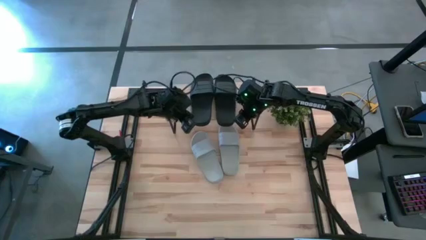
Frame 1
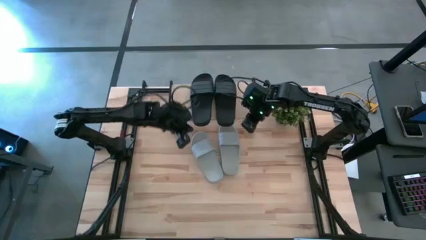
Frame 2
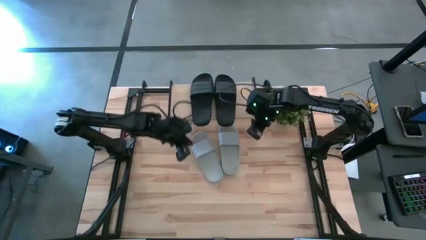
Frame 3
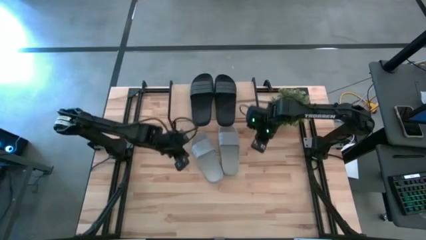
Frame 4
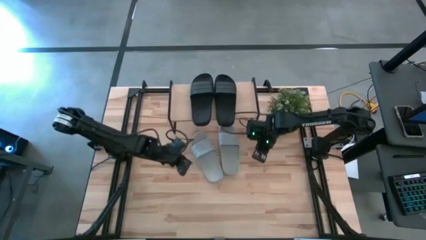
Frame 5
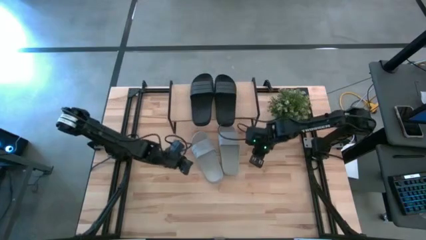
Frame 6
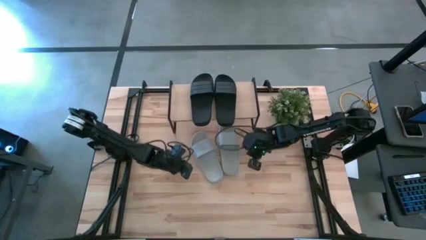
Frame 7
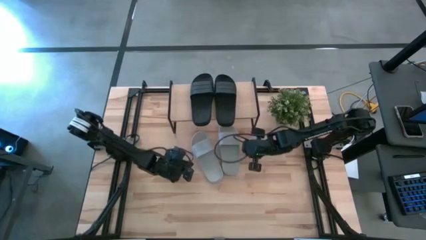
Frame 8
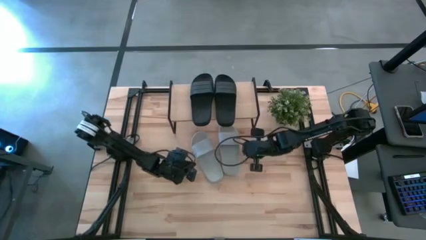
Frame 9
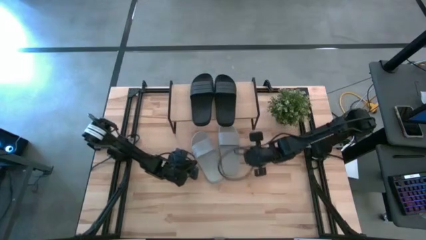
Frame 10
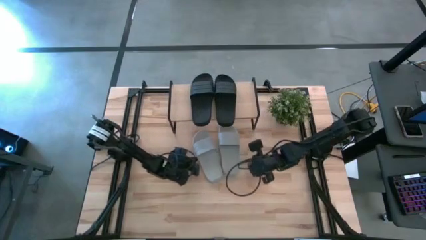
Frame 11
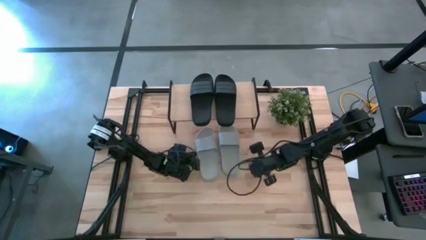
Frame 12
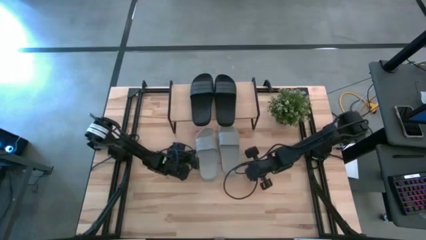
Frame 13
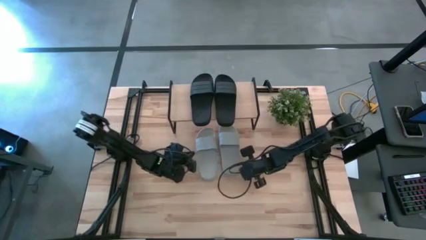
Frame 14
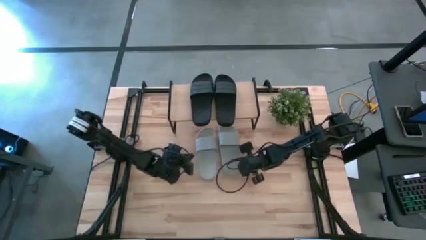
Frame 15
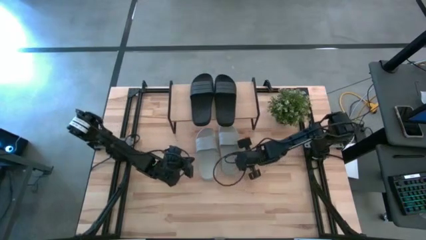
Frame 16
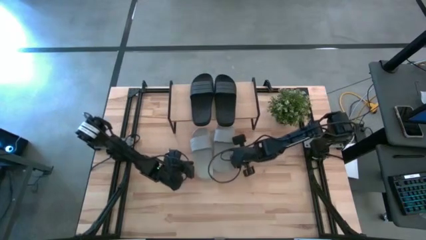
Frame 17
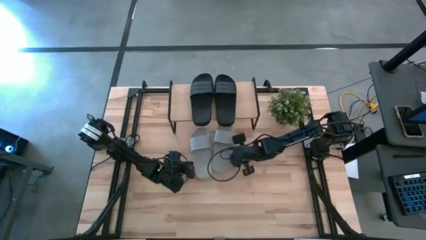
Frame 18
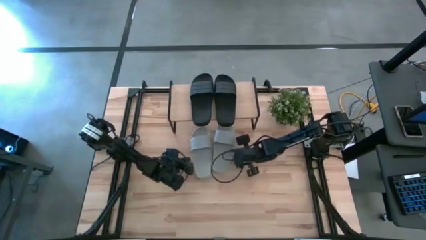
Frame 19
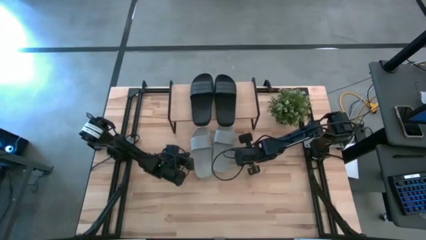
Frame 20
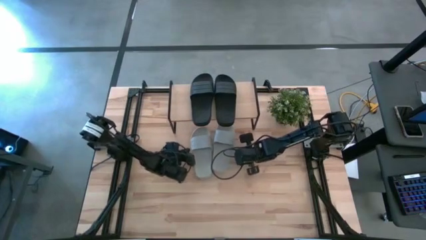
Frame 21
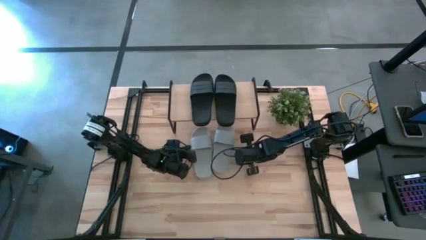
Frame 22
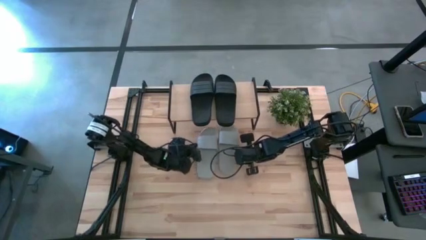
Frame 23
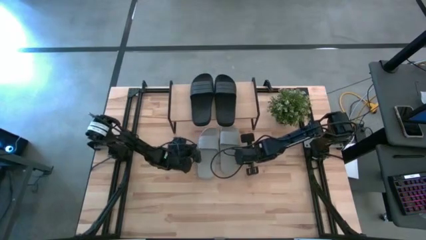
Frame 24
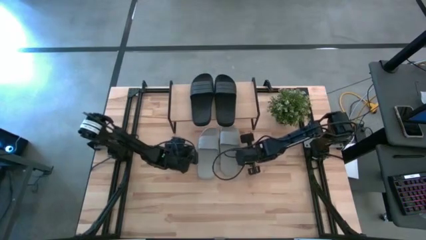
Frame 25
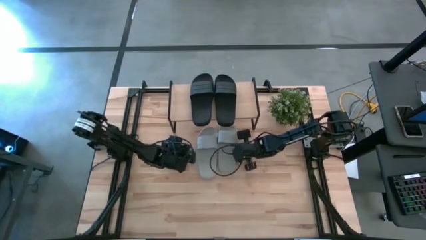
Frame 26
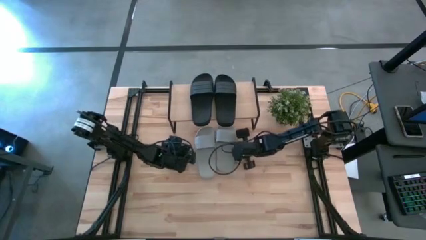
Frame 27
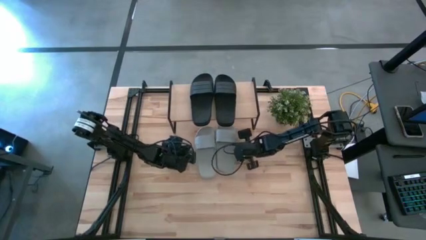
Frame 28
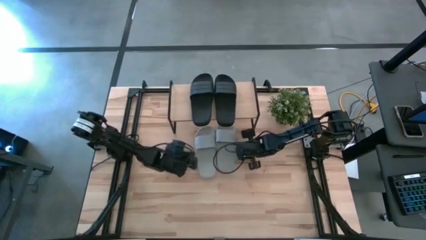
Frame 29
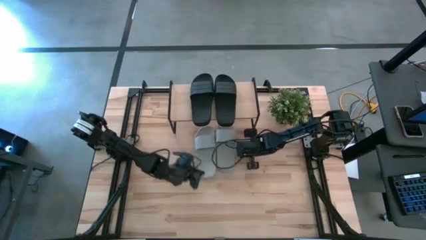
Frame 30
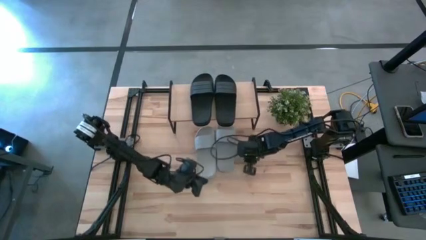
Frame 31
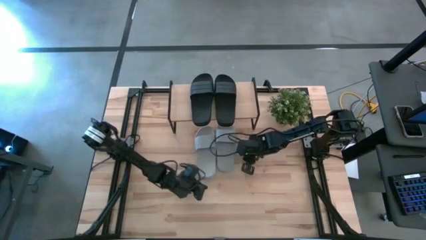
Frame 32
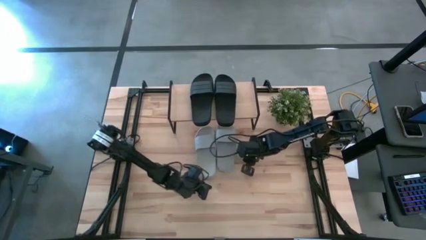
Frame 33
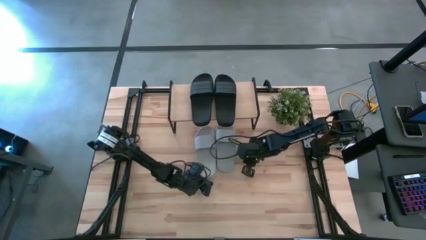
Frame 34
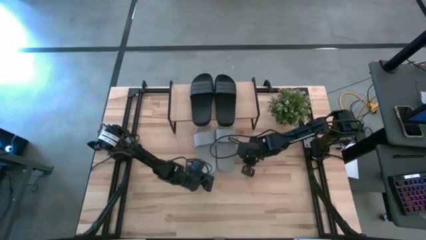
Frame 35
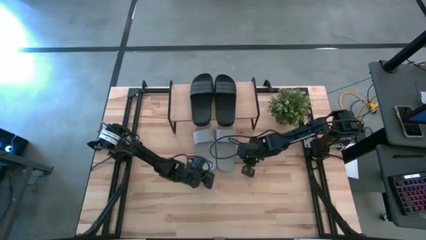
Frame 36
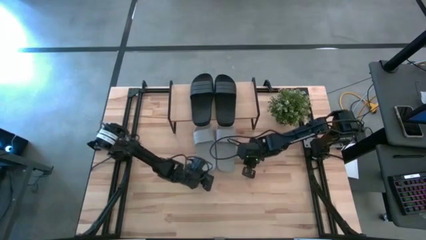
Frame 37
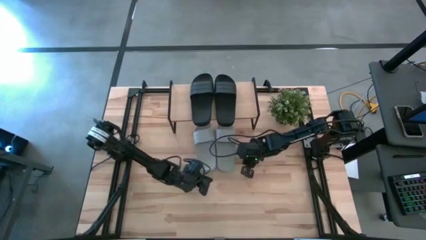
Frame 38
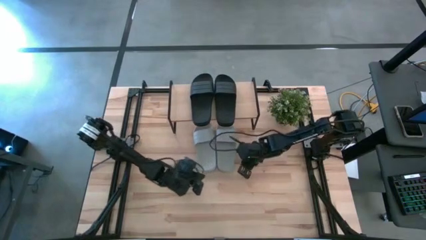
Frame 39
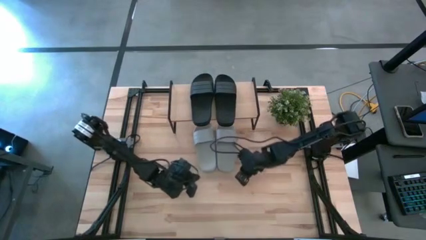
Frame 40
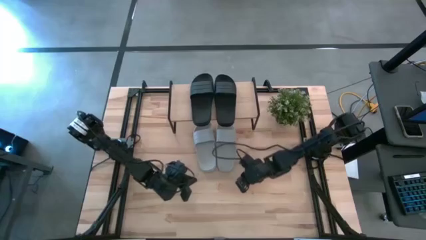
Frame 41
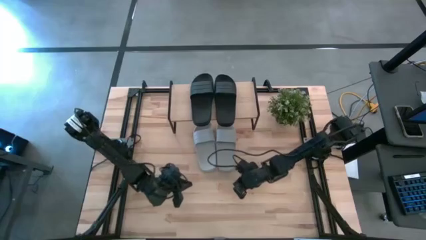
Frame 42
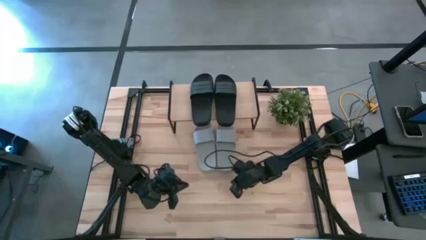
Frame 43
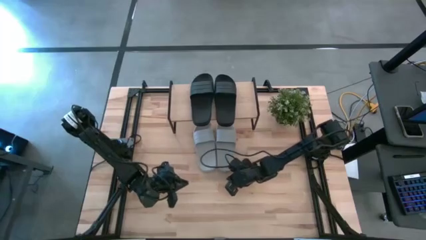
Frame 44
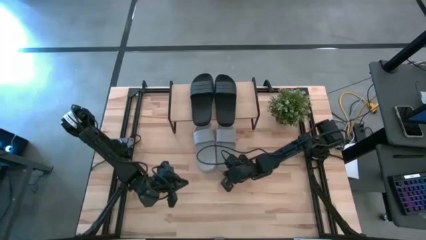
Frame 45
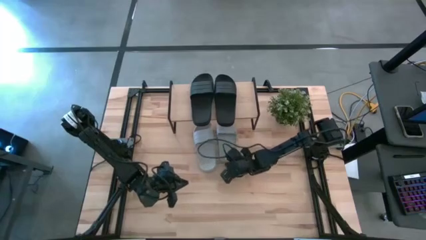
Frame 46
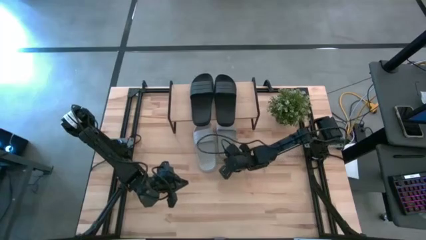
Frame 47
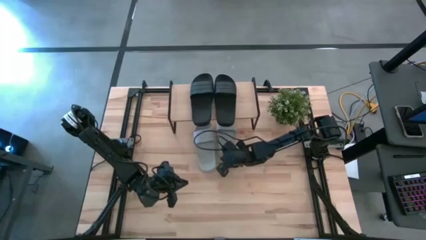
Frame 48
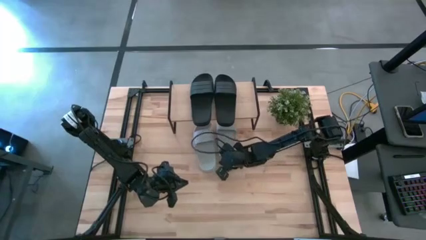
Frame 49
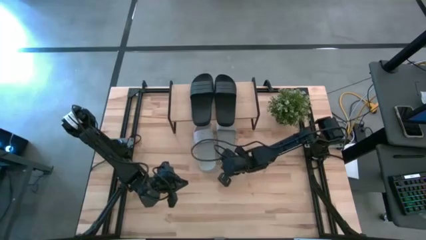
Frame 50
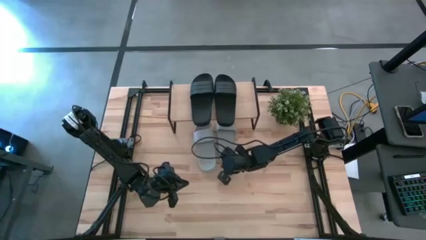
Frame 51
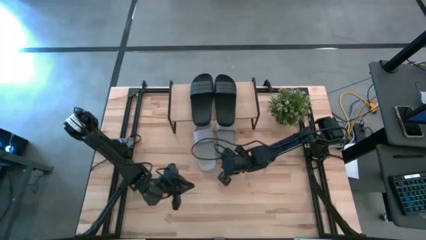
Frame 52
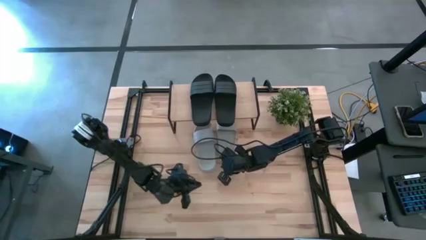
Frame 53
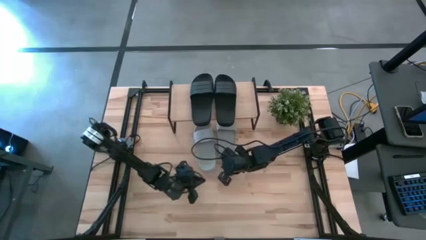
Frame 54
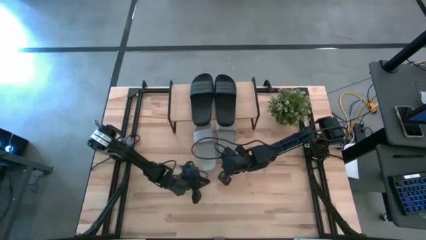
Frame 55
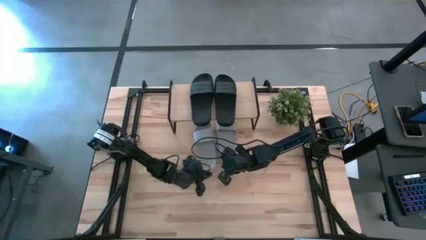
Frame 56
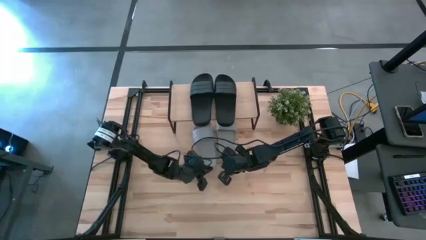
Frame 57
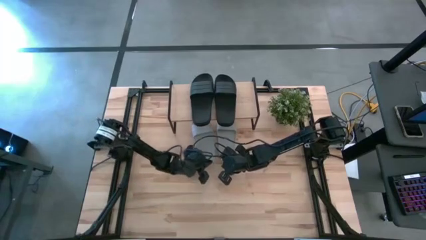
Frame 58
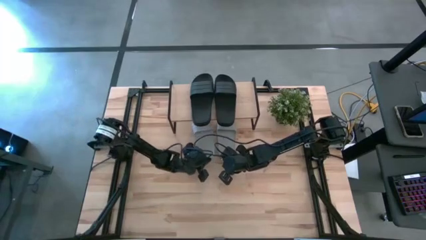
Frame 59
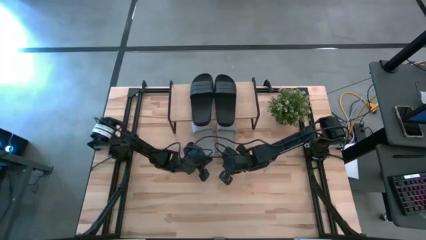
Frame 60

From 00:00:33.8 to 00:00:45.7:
Task: Pick and place slides into the shelf
Adjust the gray slippers

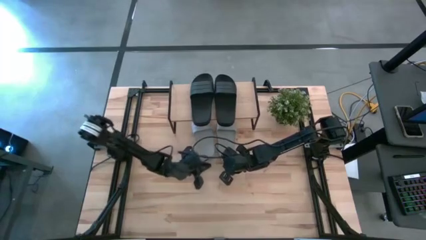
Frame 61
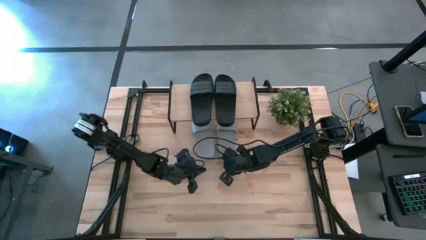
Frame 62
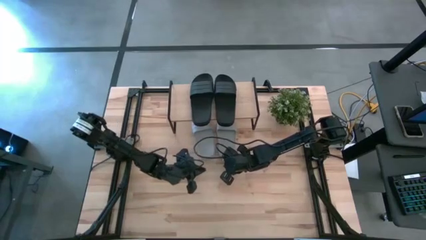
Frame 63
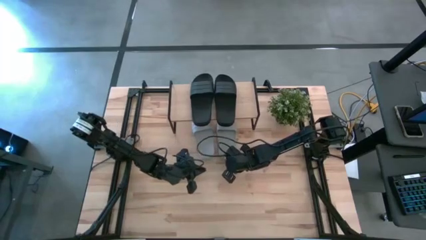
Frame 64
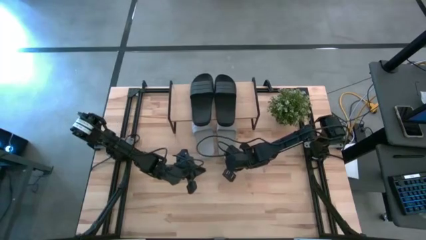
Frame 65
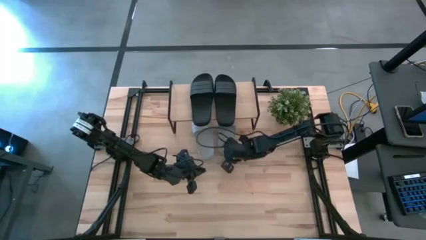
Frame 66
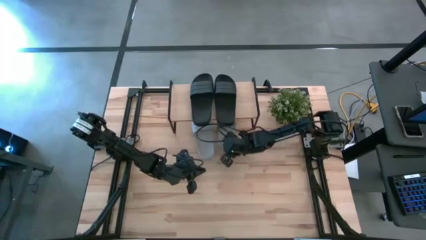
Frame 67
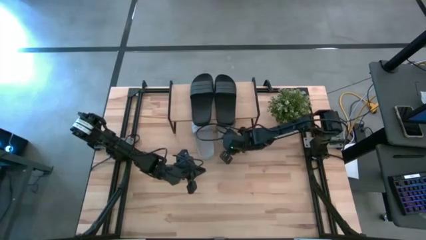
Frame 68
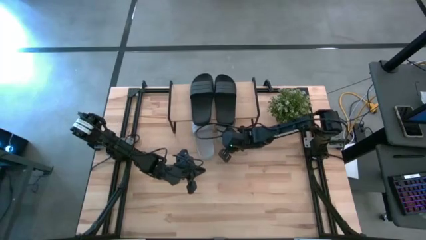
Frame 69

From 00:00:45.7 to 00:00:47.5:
Put the right gray slipper under the shelf

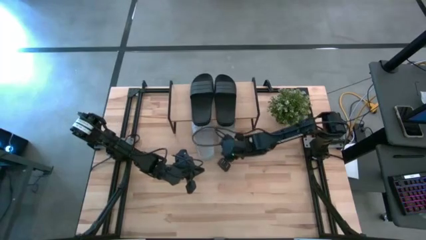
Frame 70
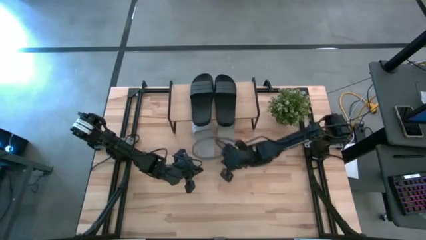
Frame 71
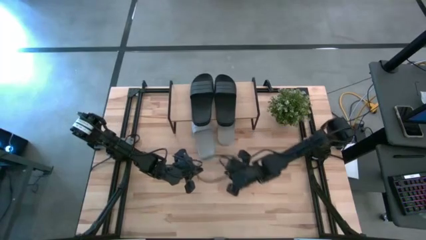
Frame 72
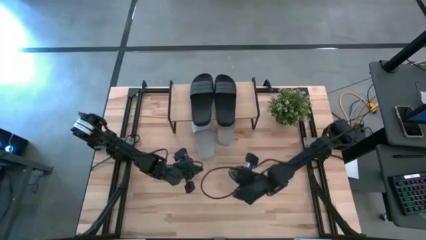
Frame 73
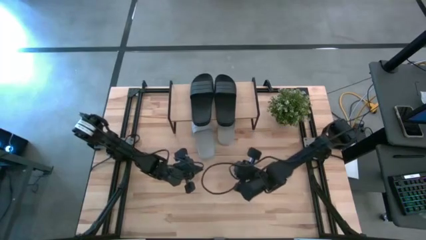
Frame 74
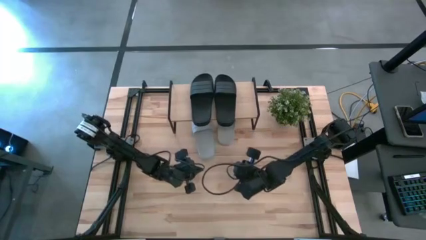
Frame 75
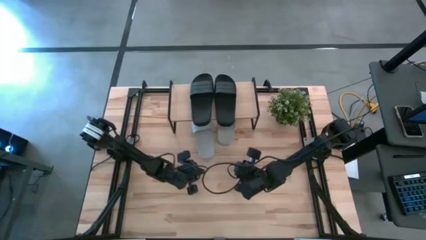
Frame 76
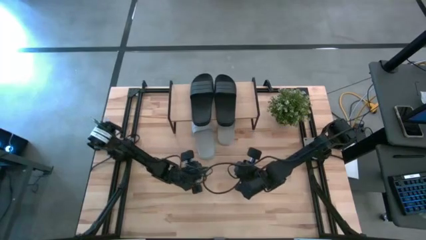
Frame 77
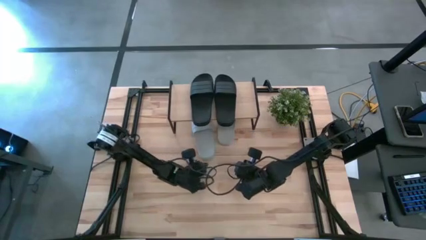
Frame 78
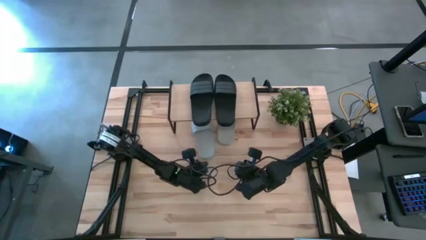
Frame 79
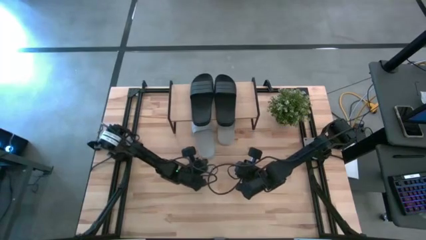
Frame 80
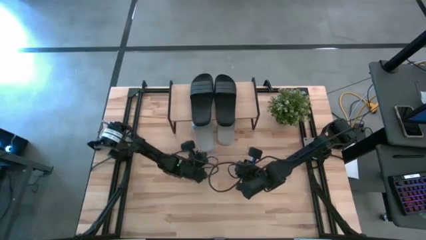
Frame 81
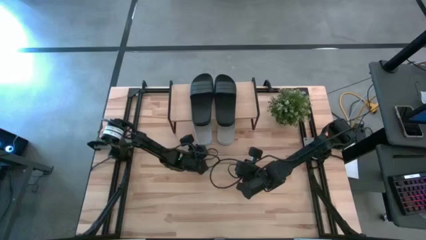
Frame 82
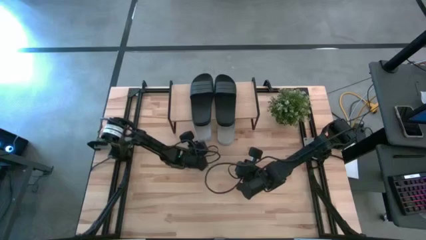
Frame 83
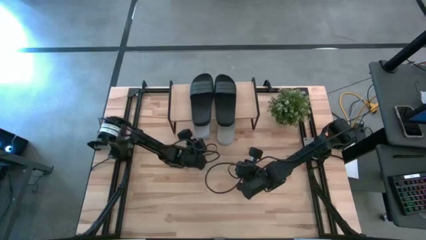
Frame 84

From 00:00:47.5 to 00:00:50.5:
Put the gray slipper under the shelf
